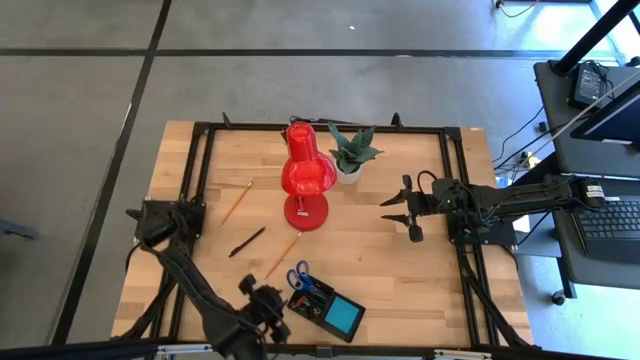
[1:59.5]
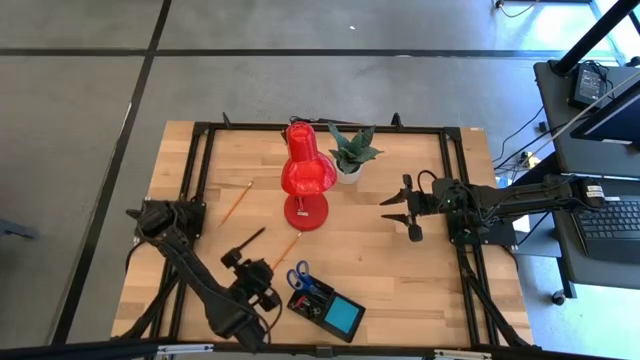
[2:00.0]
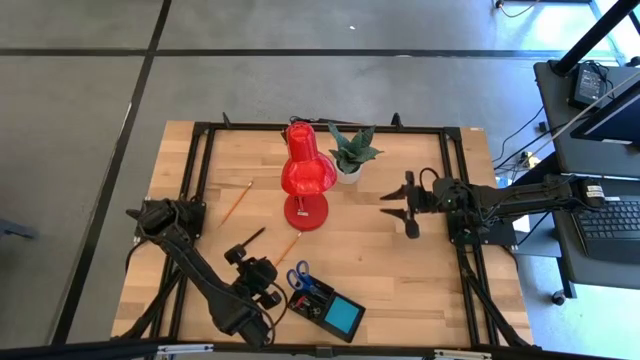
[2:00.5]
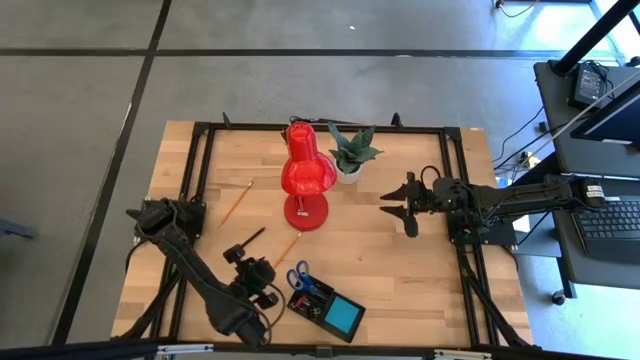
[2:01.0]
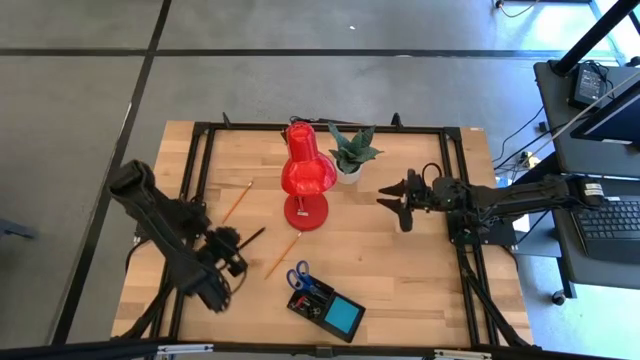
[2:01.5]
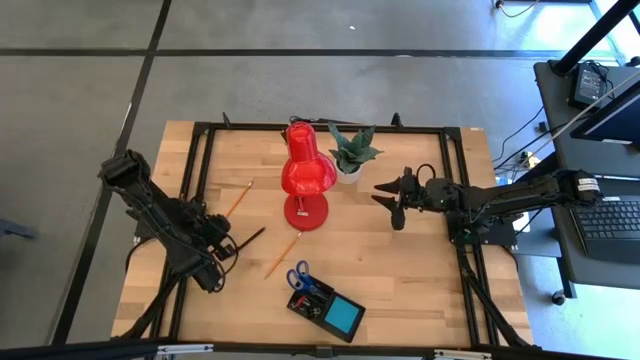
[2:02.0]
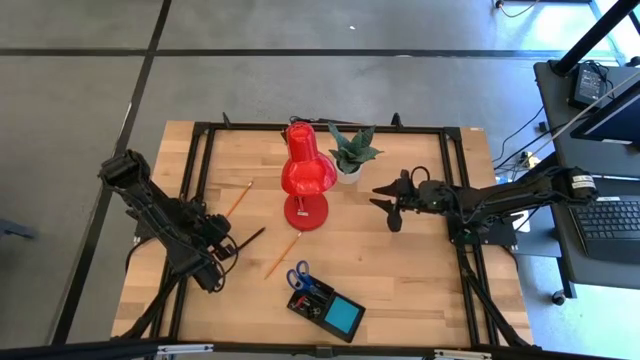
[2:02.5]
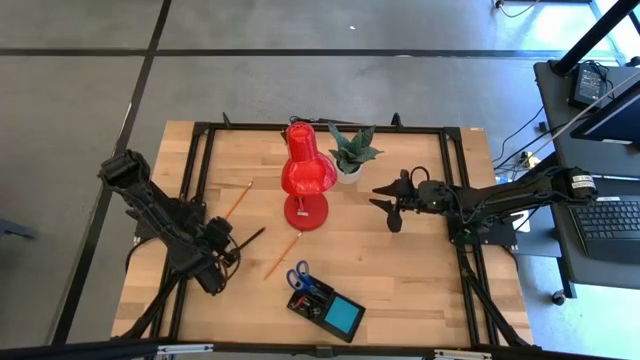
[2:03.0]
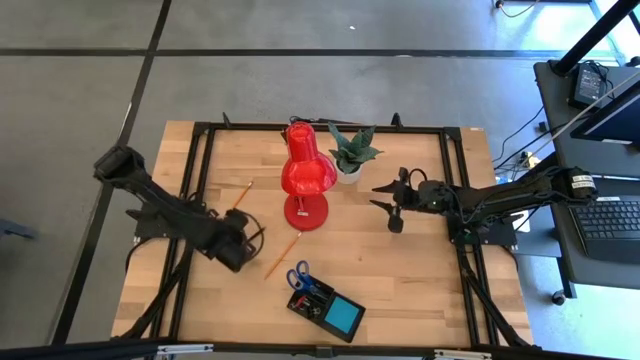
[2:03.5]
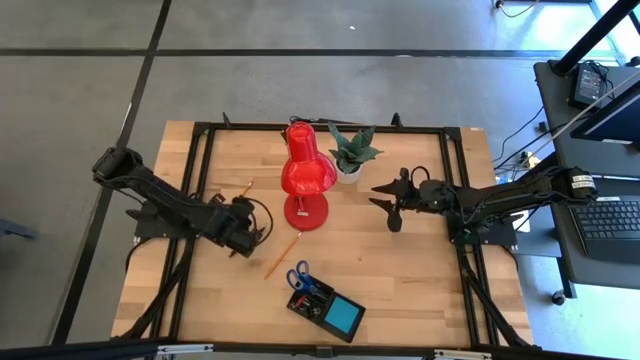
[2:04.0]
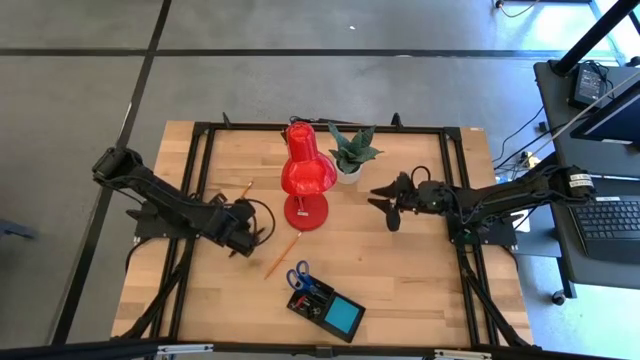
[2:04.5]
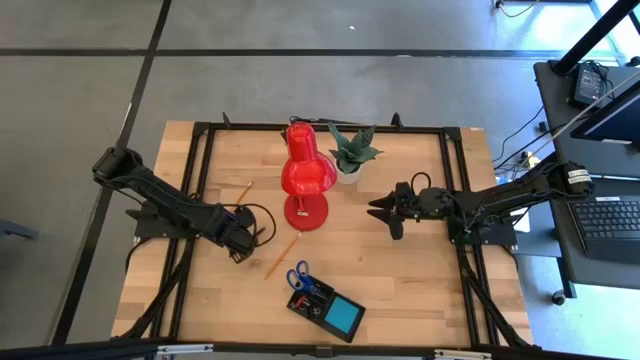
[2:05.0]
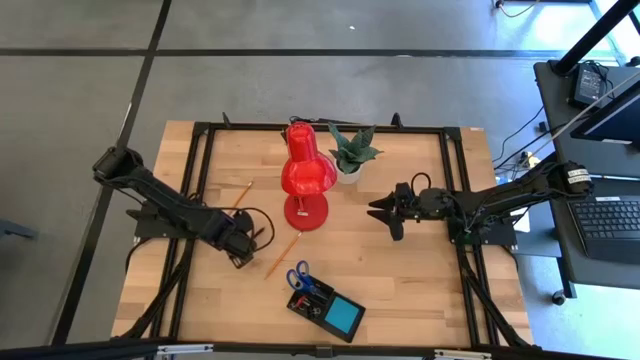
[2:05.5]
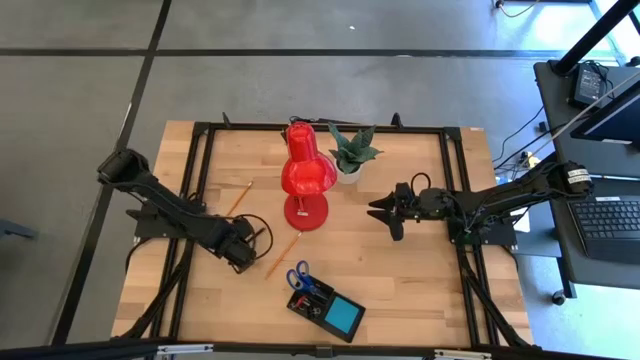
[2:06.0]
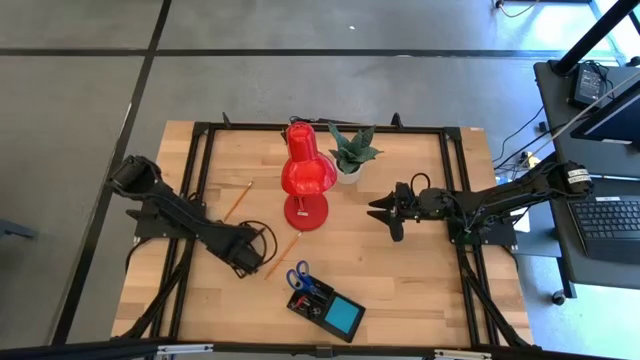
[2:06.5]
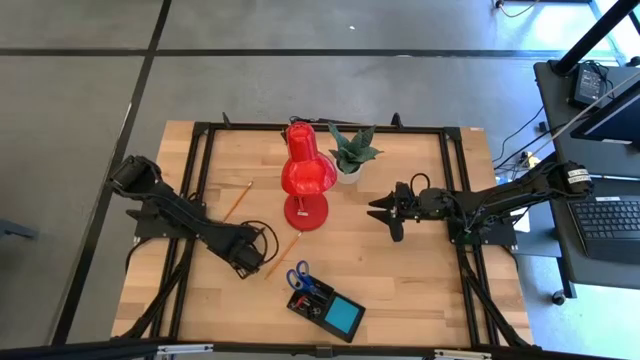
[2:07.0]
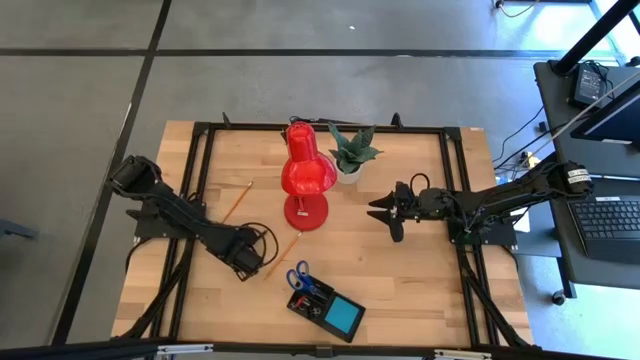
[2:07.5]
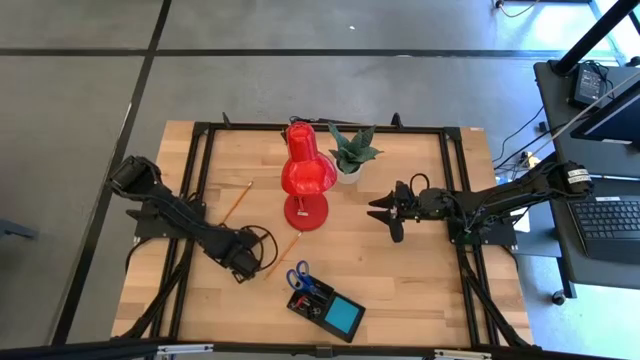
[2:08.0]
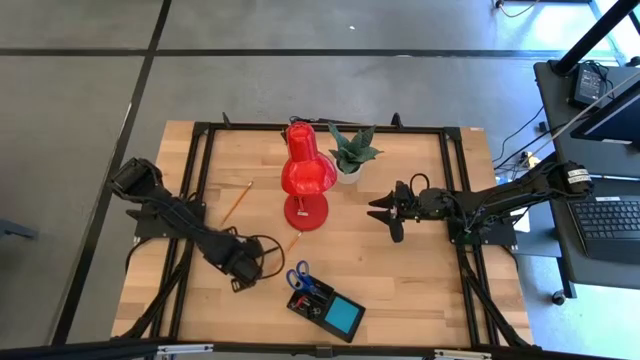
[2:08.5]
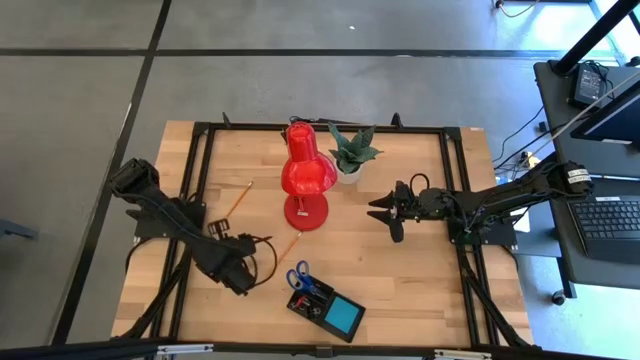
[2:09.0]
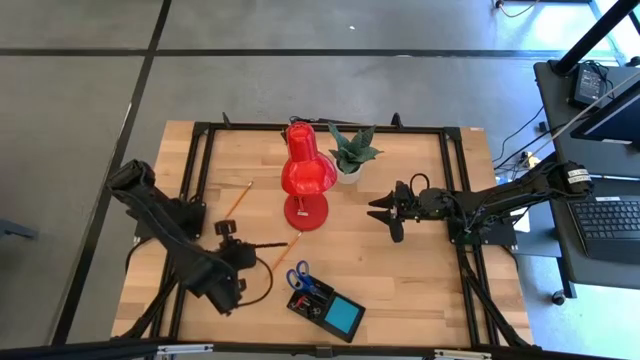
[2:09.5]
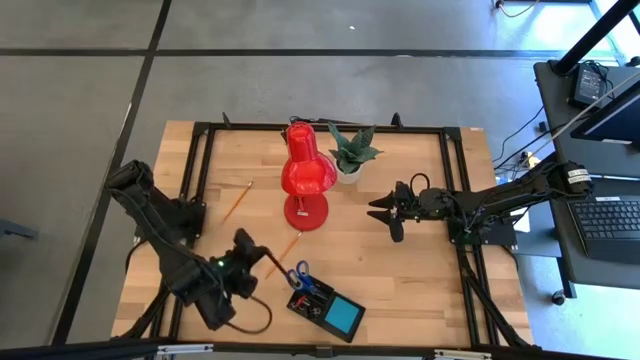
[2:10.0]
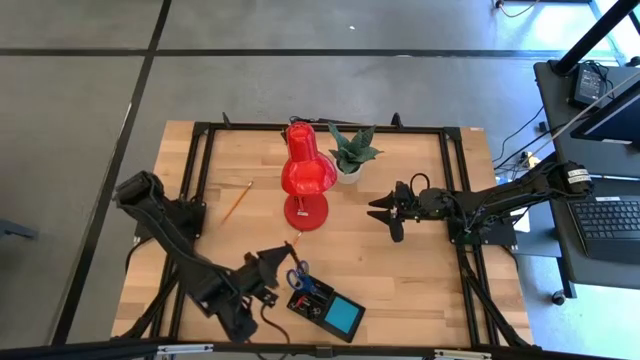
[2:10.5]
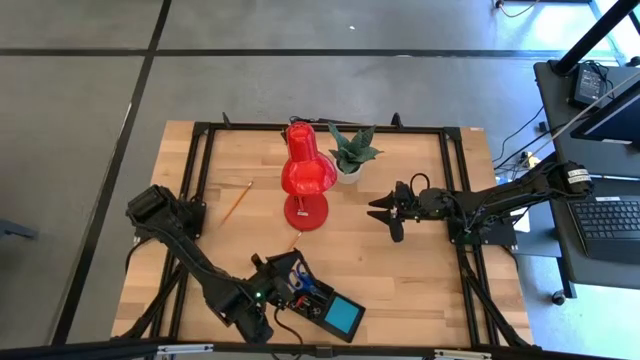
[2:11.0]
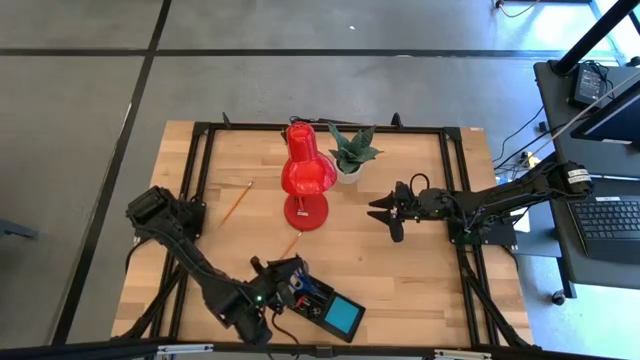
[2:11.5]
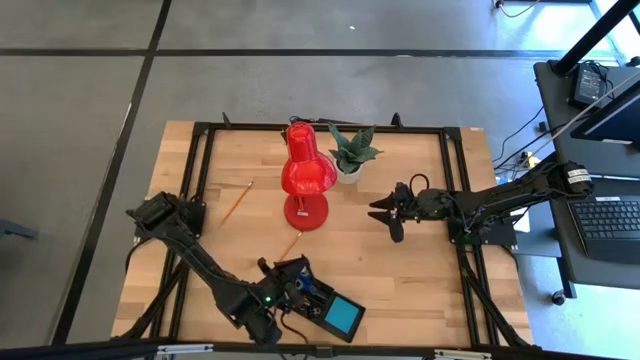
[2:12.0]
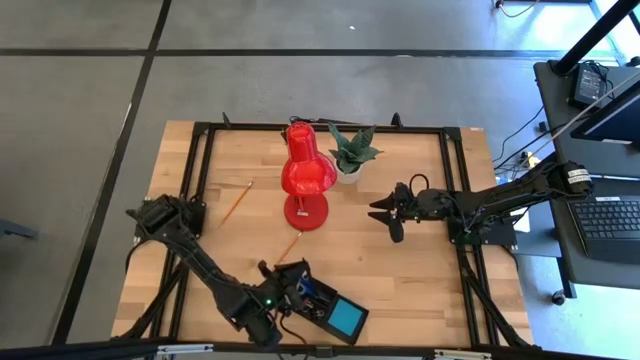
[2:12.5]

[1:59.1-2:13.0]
Task: Pick and place office supplies into organizer
Put the black pen into the black desk organizer

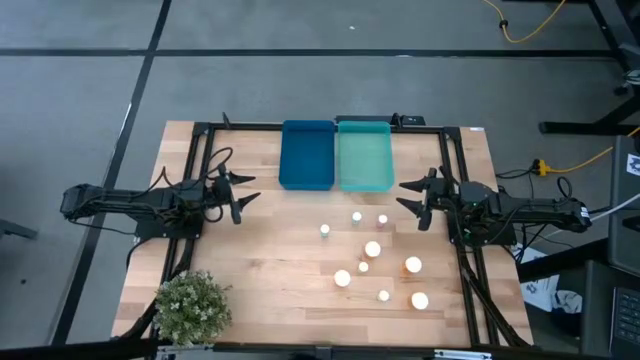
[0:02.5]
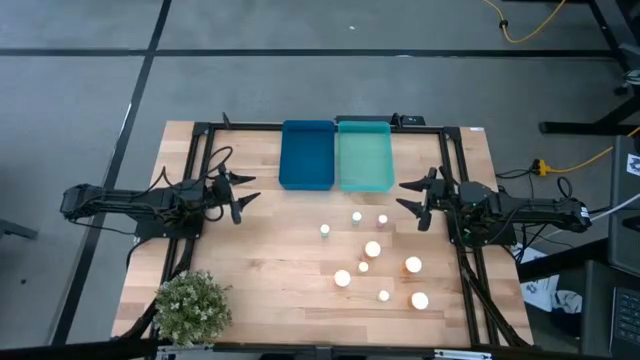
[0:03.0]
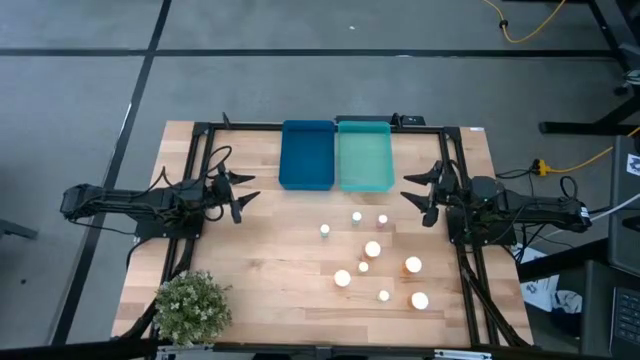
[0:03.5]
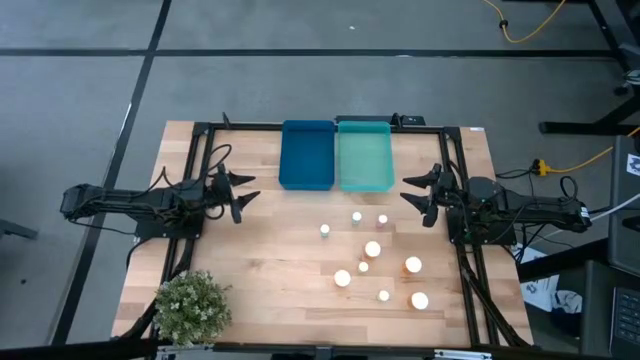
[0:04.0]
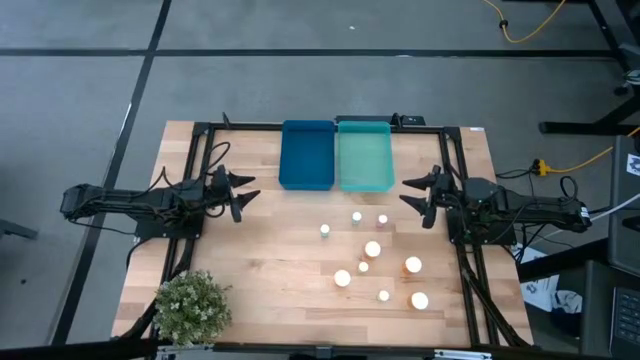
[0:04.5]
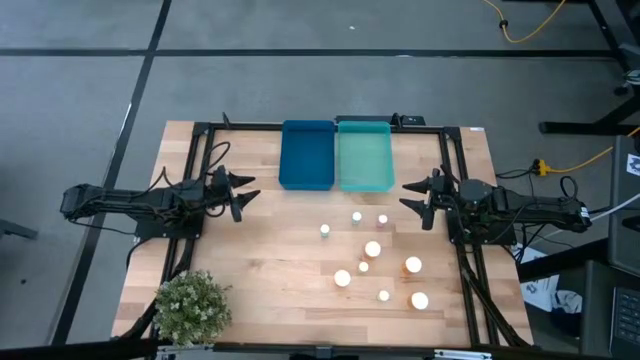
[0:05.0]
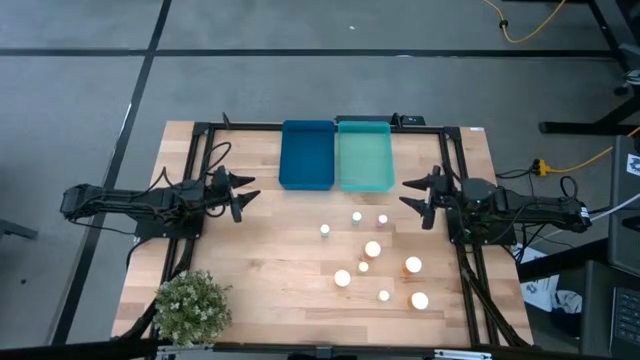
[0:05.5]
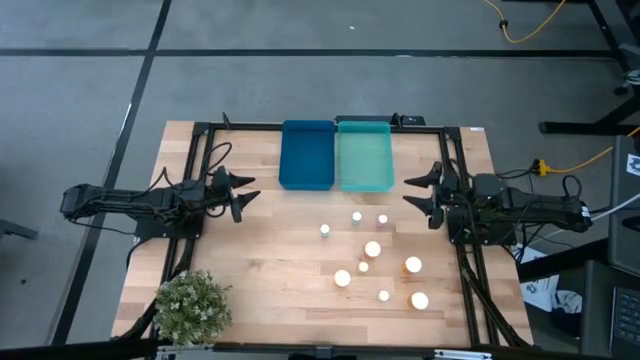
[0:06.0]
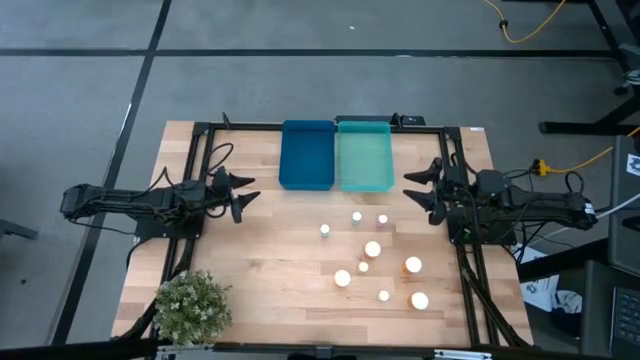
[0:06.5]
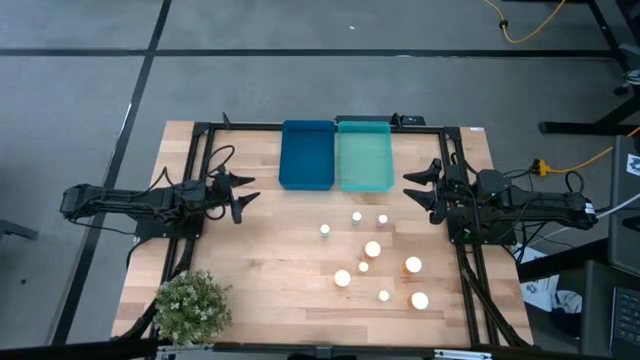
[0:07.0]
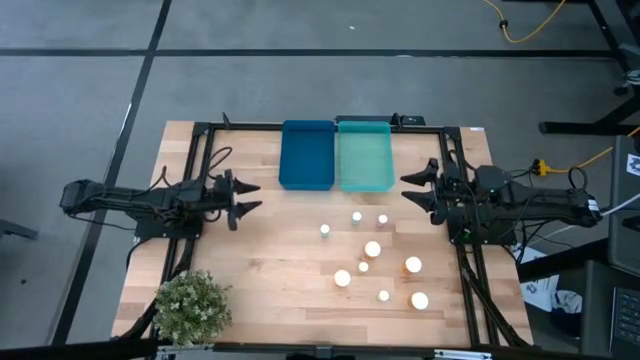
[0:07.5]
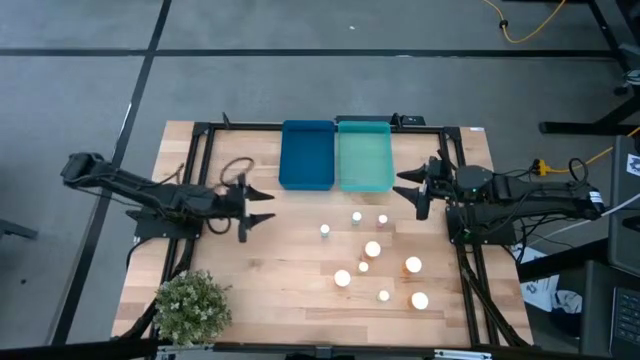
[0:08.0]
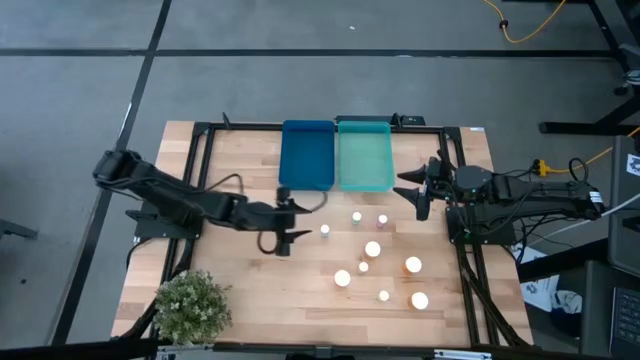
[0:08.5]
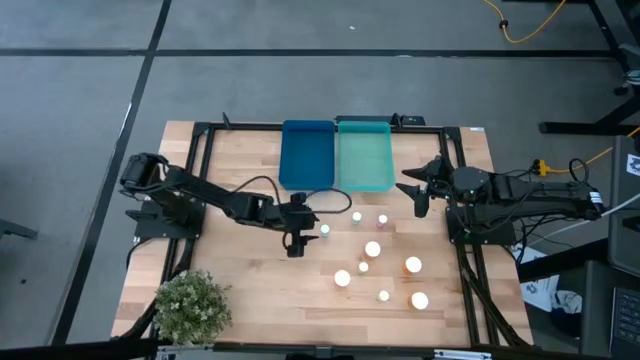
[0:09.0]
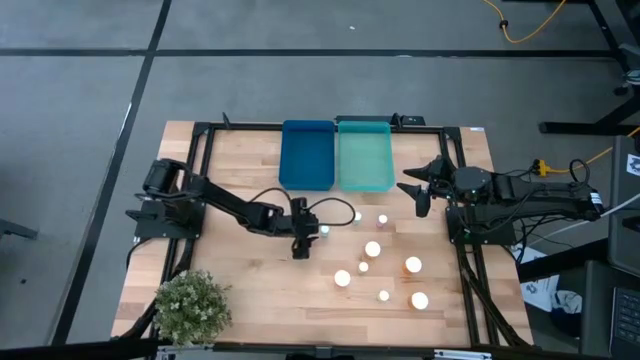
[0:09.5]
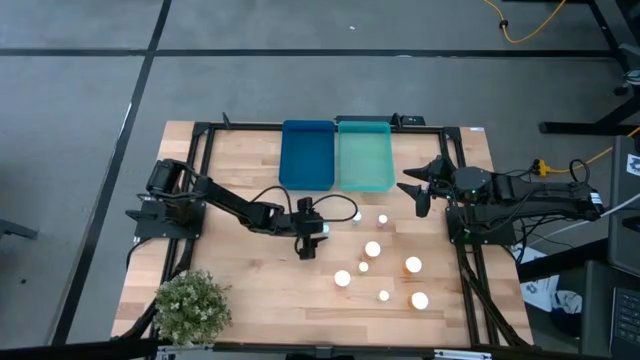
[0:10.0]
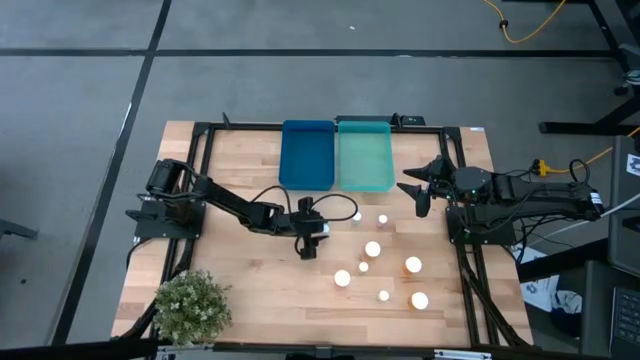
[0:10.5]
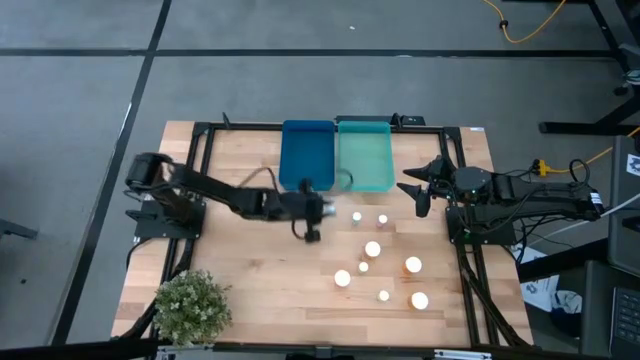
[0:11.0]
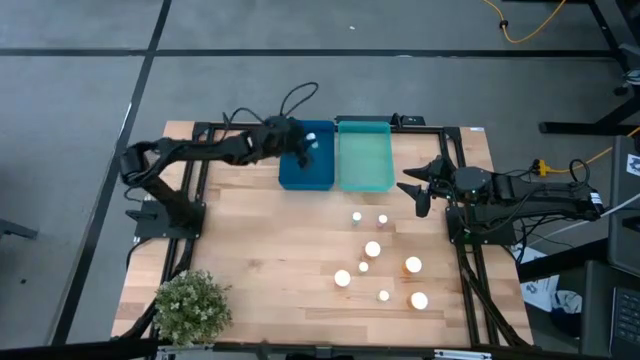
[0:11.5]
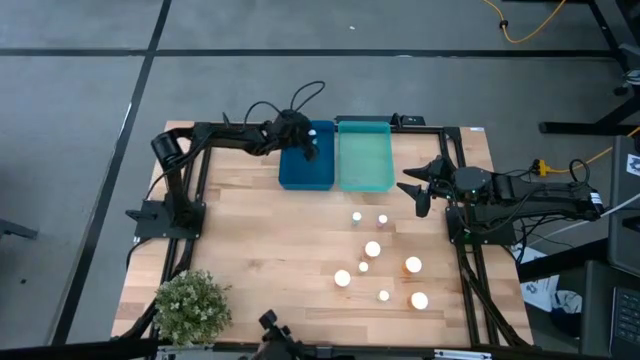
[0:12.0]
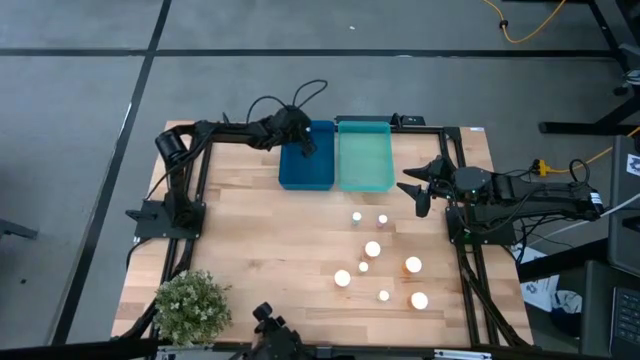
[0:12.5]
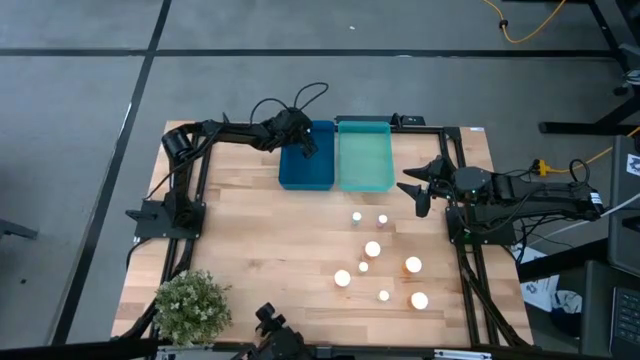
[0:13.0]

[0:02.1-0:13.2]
Task: Pick and place medicine bottles into bin by pill shape (circle, oval)
Put the bottom blue pill bottle into the blue bin
